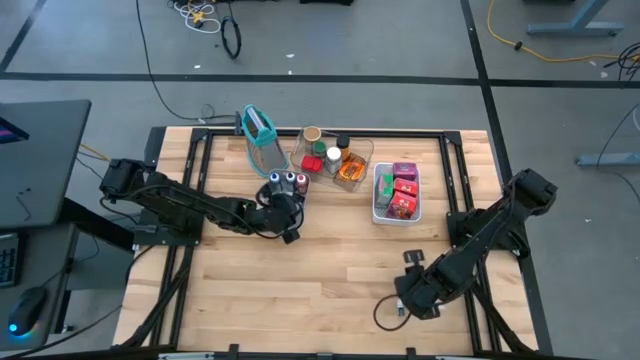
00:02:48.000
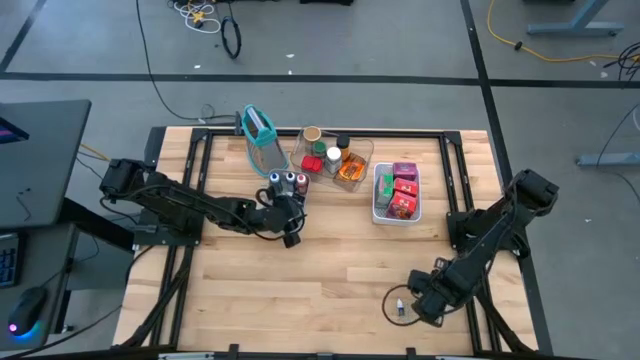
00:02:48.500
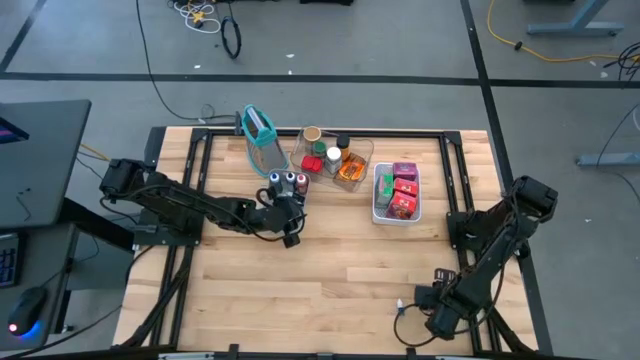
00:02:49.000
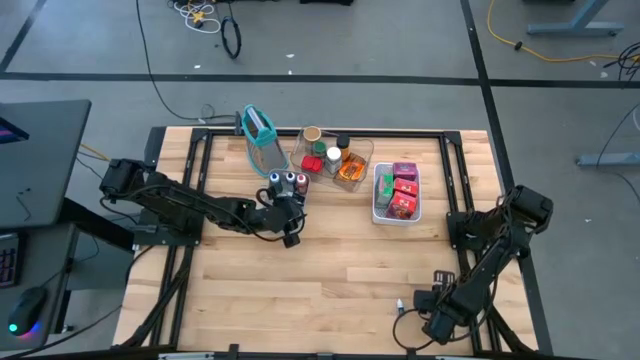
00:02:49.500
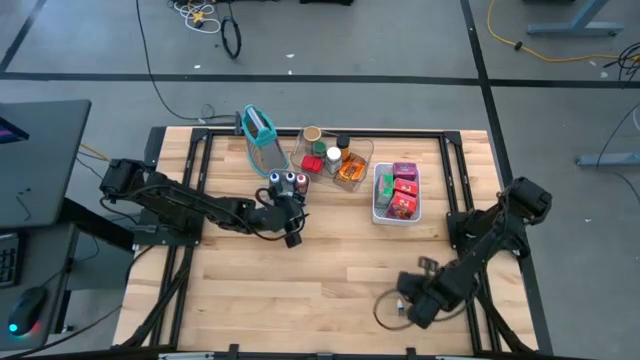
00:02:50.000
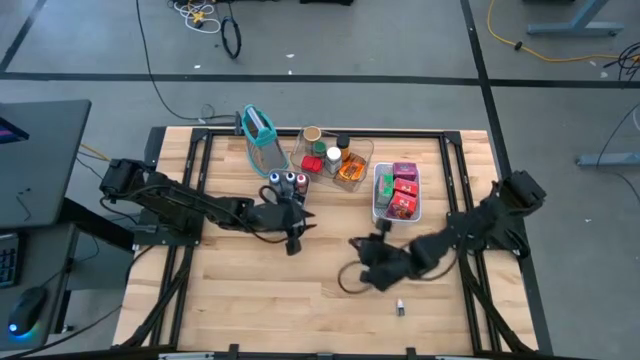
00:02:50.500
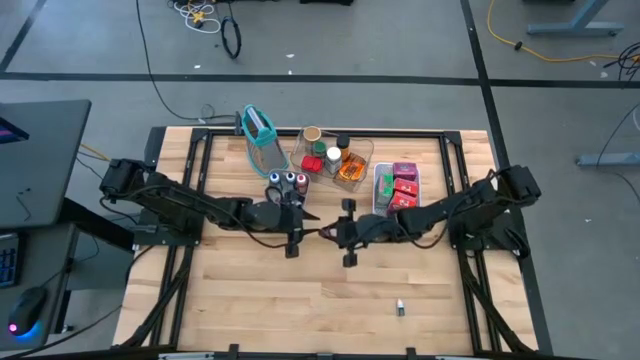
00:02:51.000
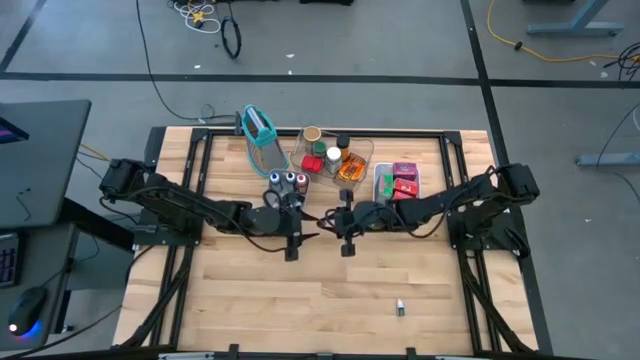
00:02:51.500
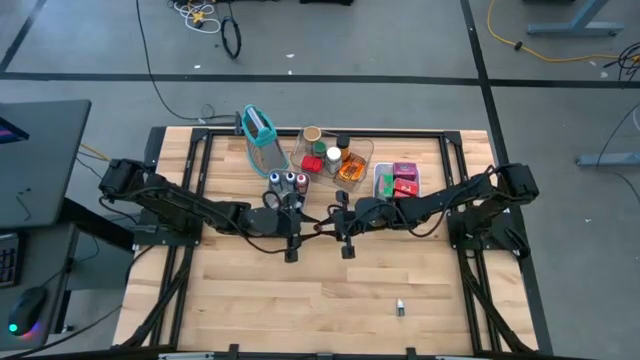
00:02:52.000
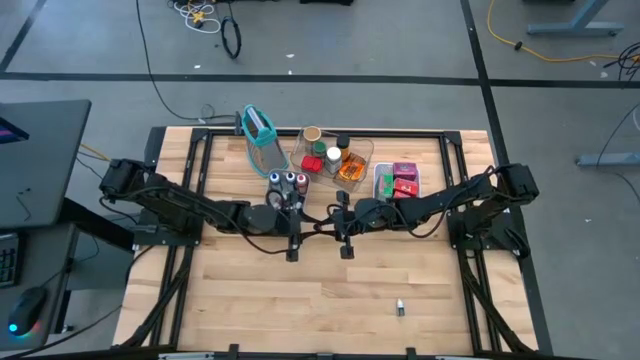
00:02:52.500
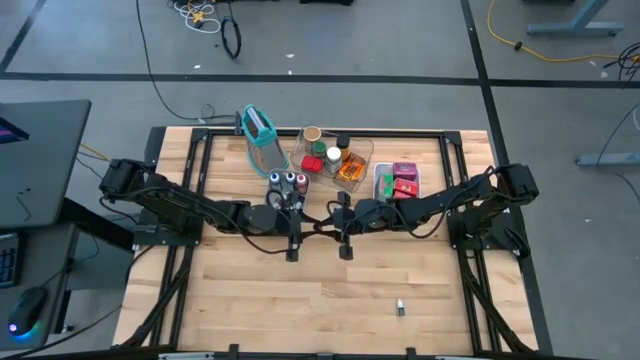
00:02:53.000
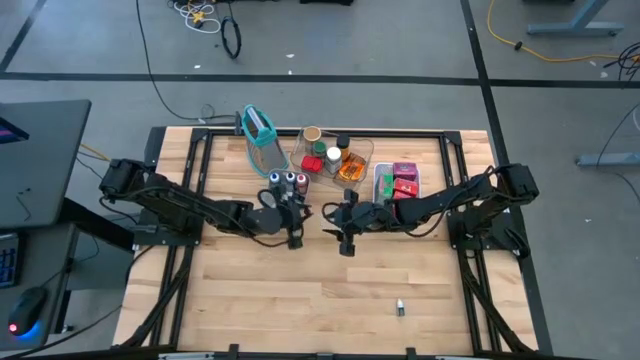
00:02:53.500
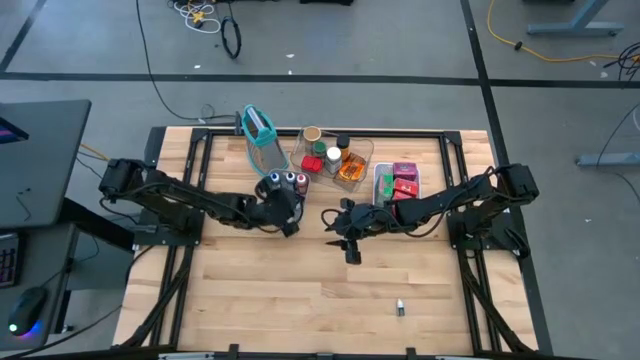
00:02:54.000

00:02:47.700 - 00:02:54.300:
Task: Pick & Place Kitchen Items
Put the small pink food coloring bottle into the gray bin

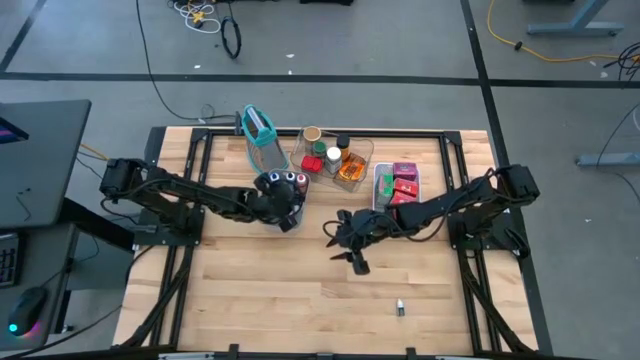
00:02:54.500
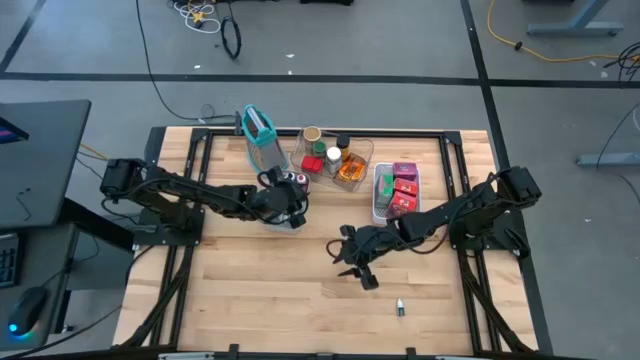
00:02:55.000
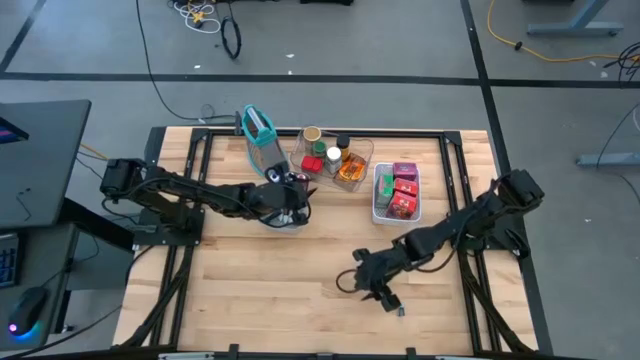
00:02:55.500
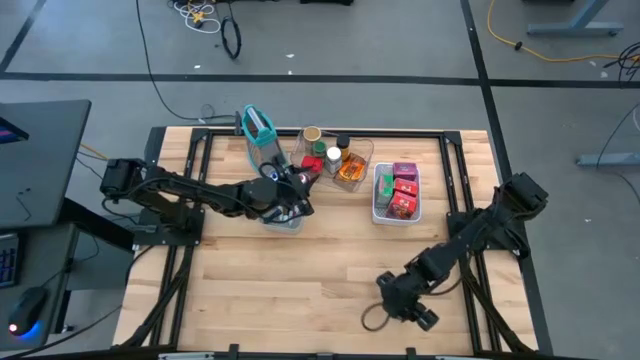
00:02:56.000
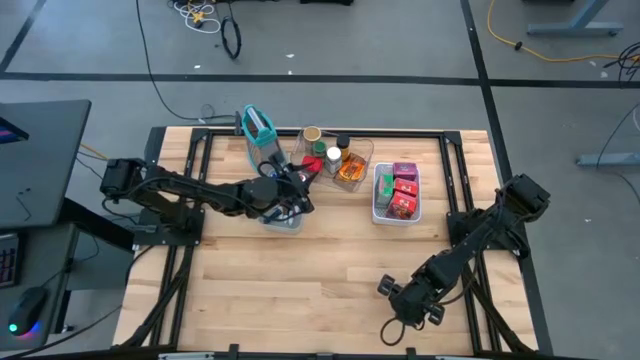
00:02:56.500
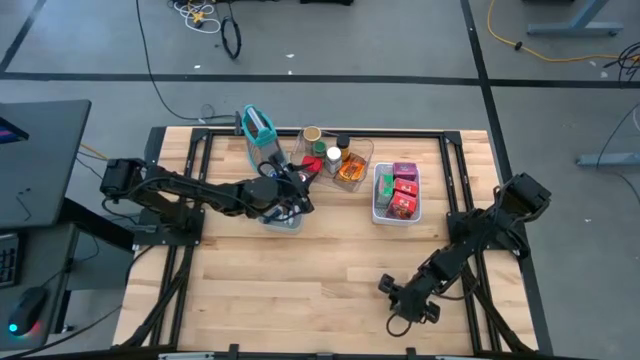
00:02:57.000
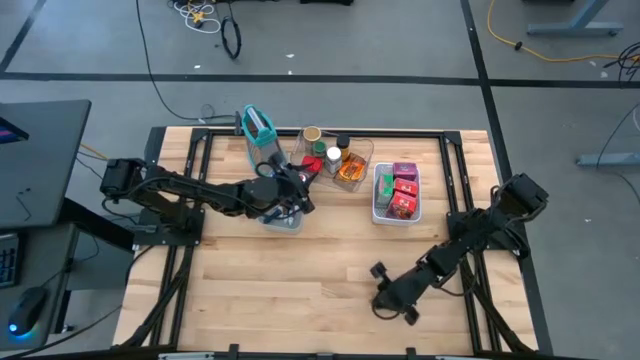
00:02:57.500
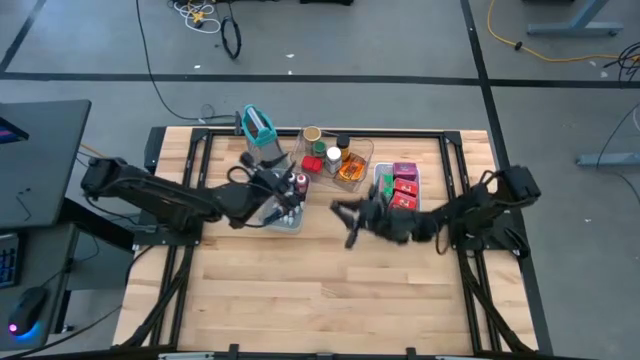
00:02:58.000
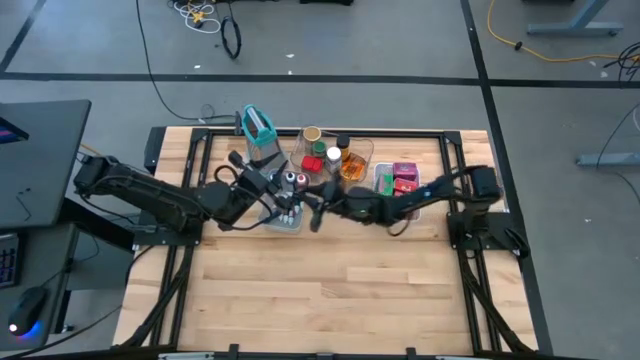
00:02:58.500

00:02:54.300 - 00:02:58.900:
Put the small black food coloring bottle into the gray bin

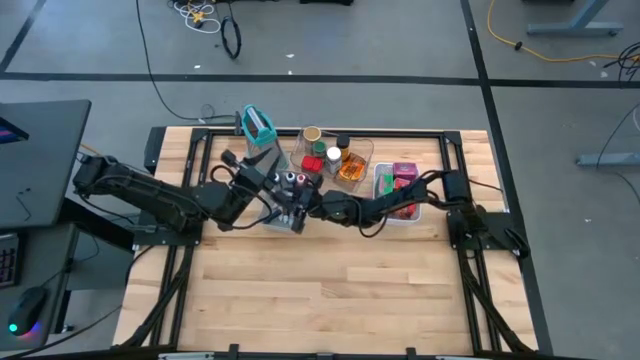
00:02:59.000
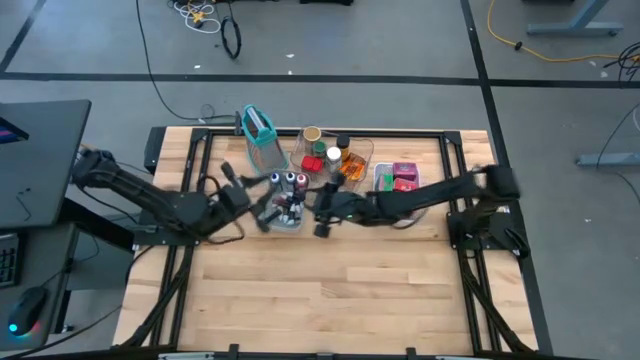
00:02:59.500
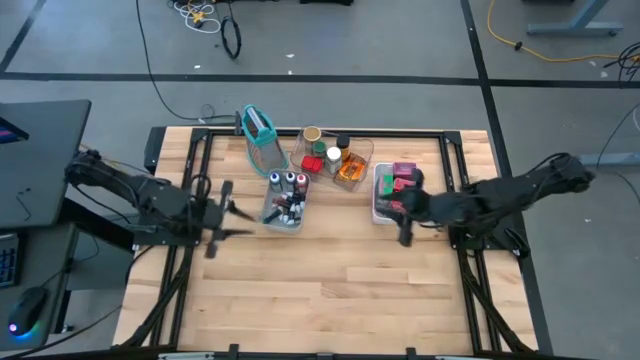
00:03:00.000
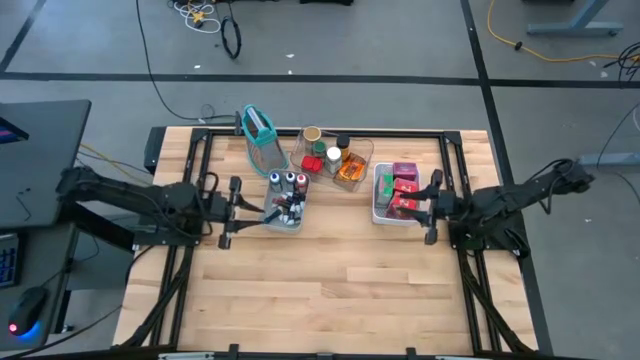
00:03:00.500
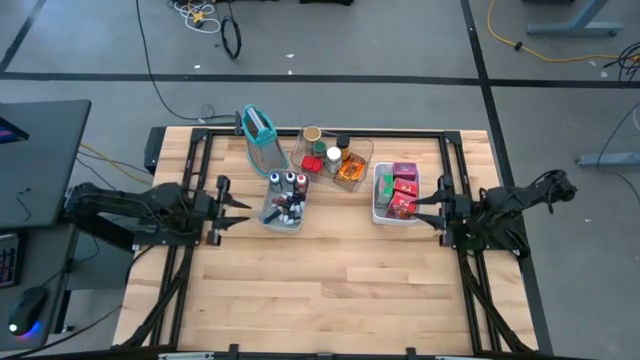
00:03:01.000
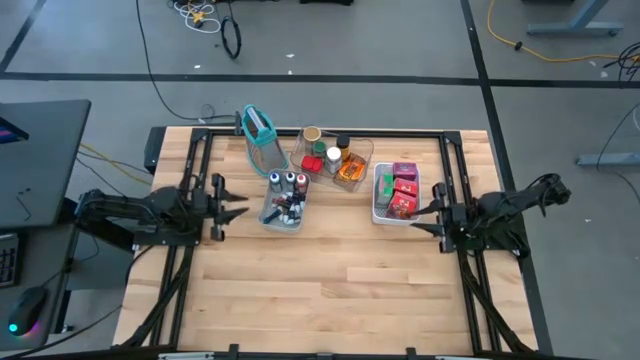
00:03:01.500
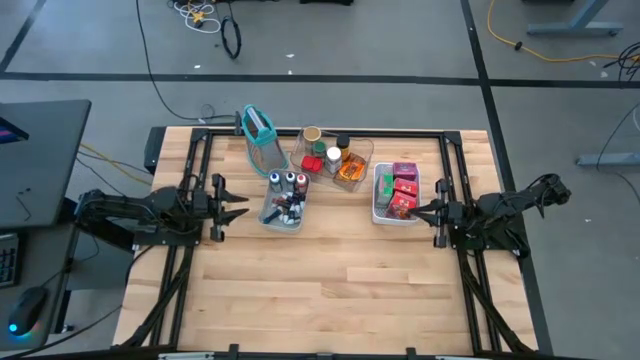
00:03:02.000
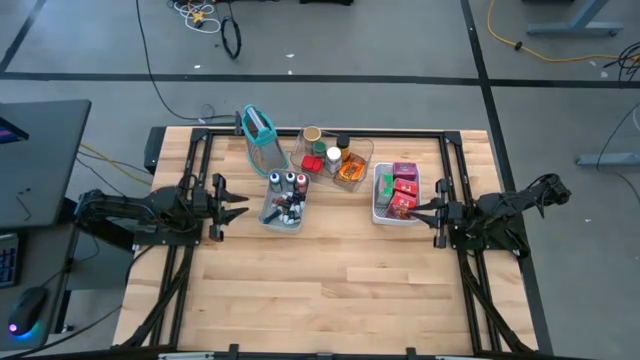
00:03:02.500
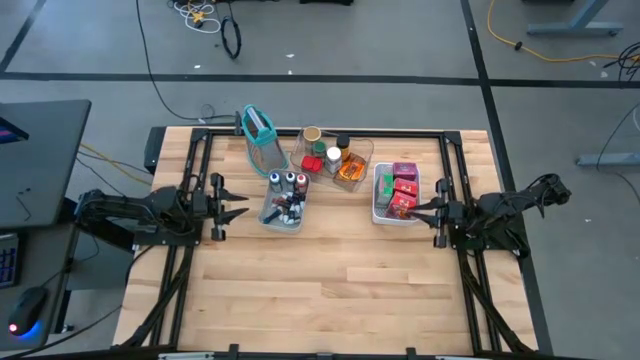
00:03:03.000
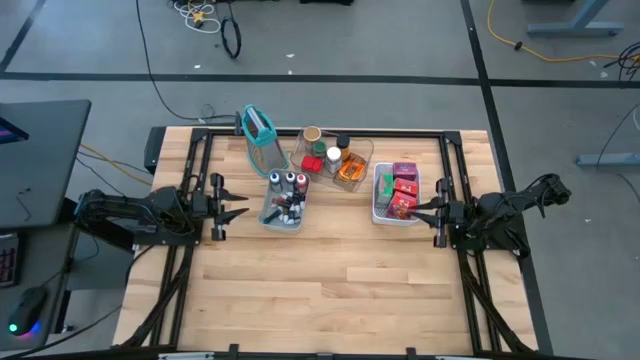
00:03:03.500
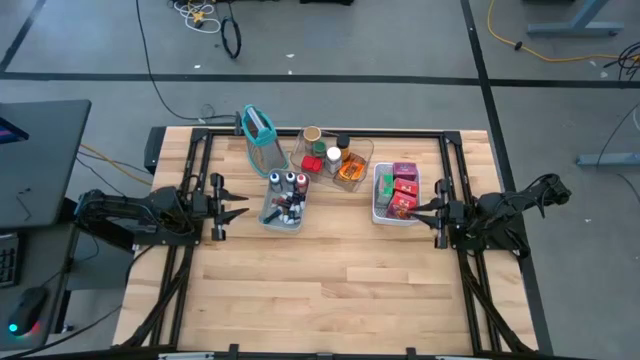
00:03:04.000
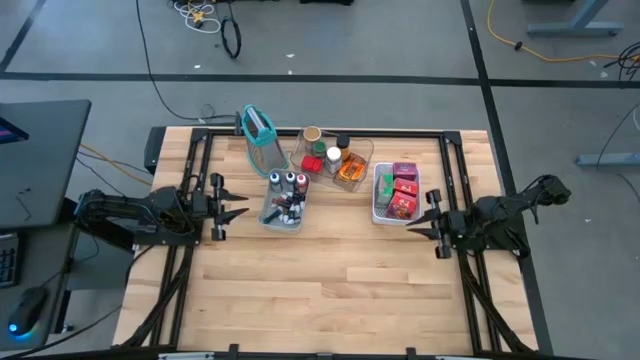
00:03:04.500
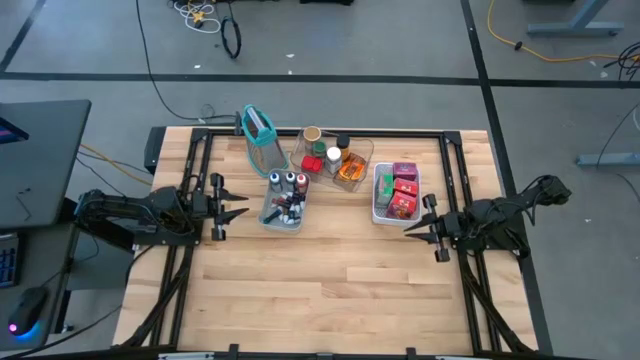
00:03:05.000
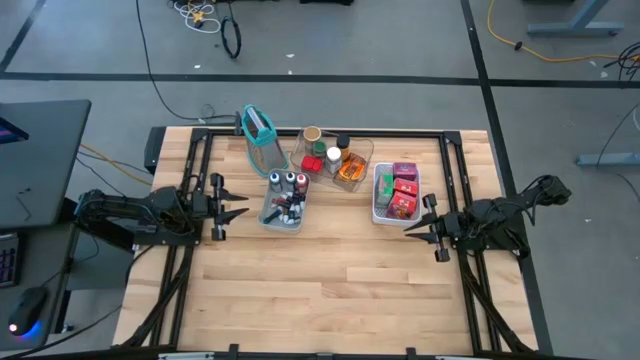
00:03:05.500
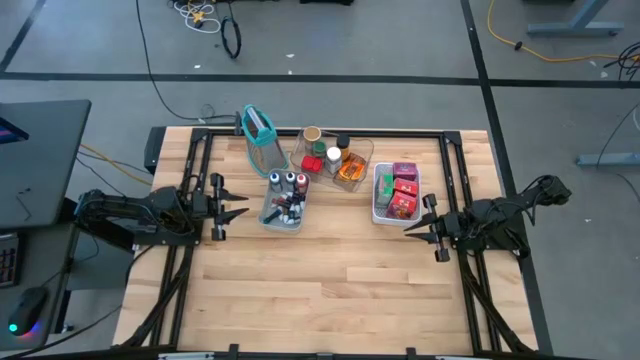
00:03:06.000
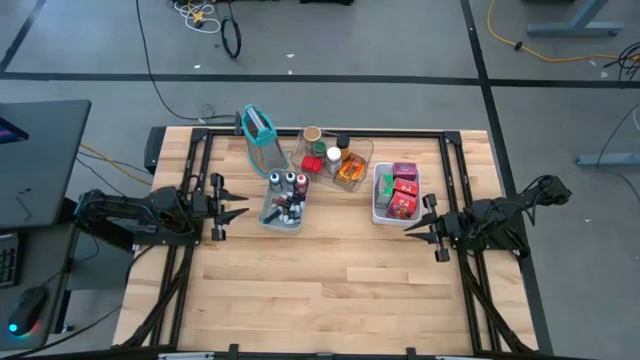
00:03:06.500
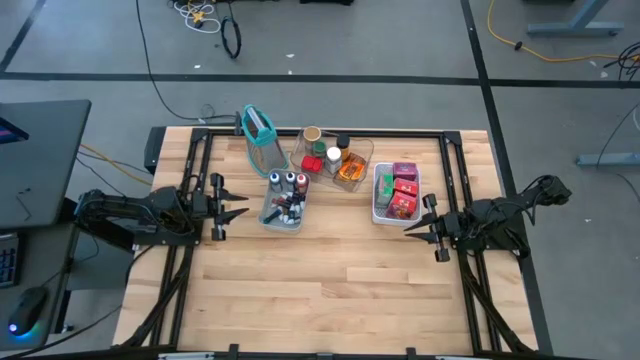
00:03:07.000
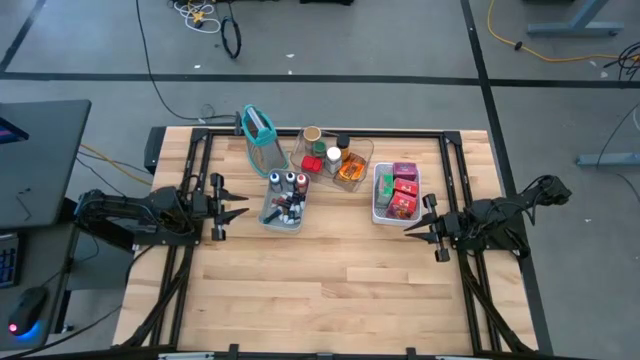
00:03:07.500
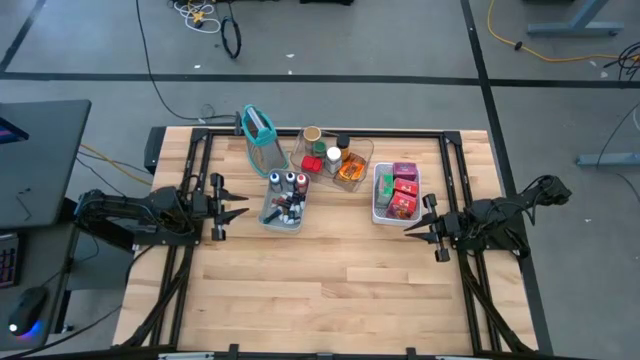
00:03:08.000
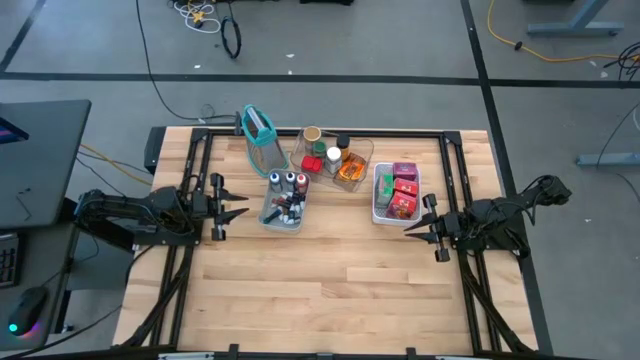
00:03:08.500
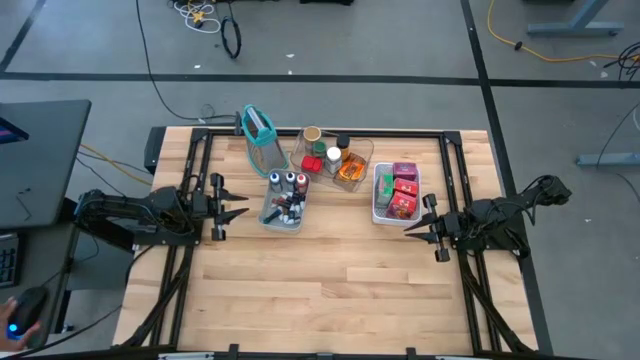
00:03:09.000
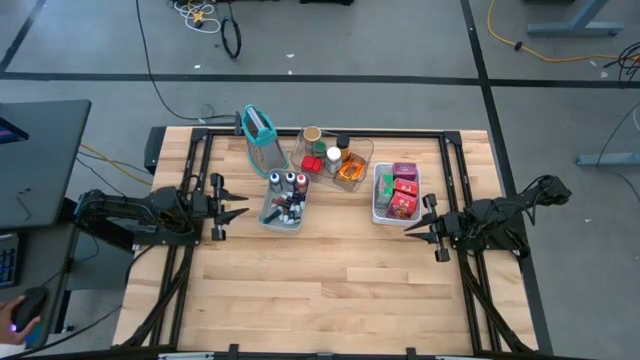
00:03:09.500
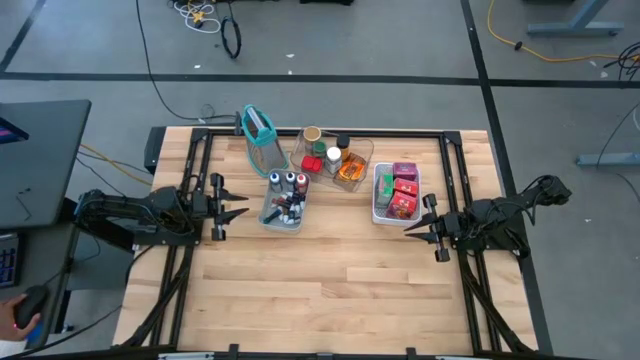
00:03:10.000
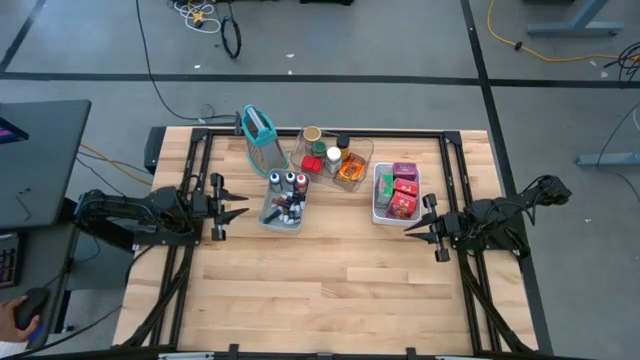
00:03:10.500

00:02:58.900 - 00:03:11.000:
Return to Home Position
